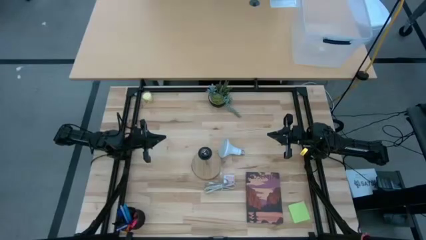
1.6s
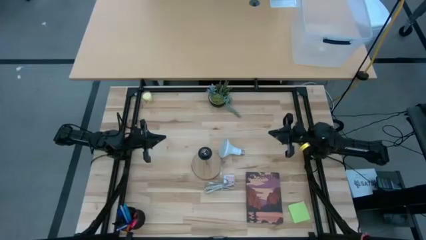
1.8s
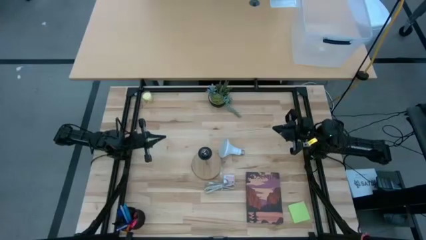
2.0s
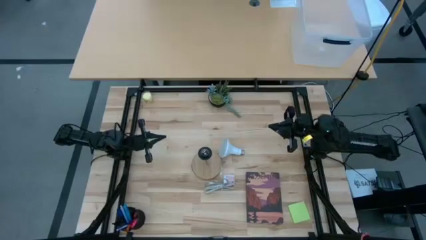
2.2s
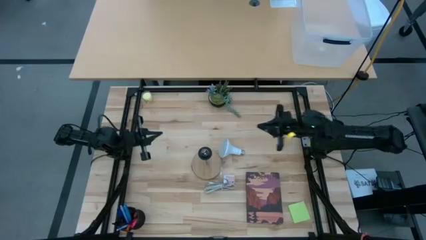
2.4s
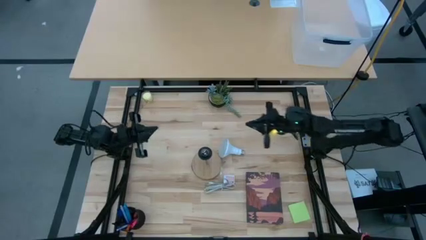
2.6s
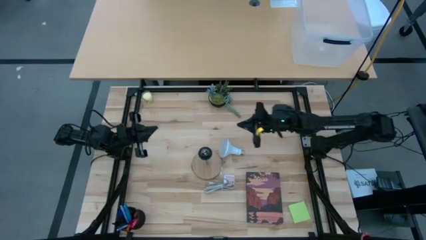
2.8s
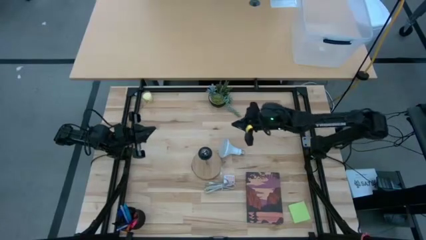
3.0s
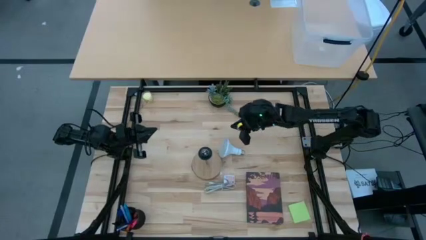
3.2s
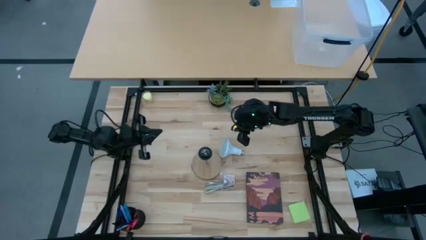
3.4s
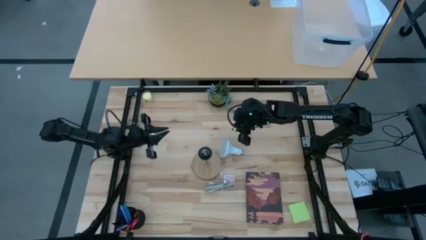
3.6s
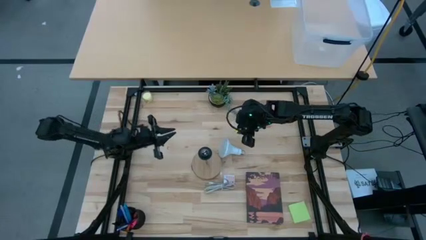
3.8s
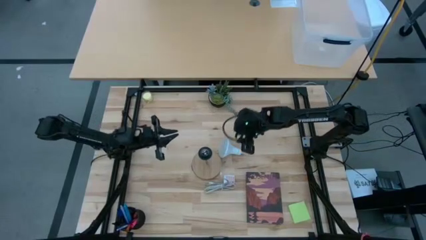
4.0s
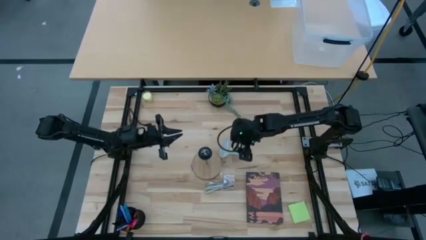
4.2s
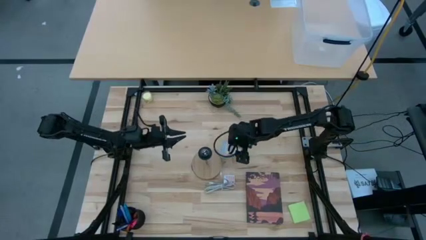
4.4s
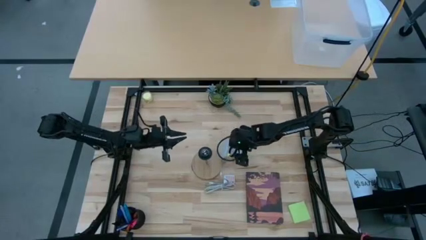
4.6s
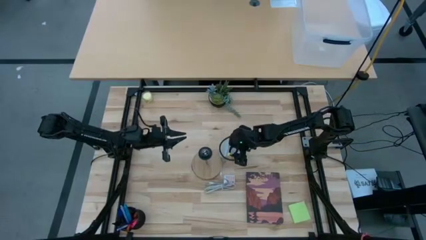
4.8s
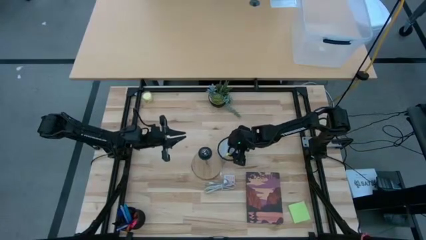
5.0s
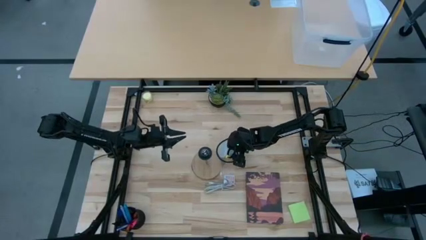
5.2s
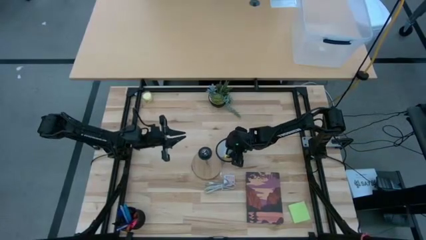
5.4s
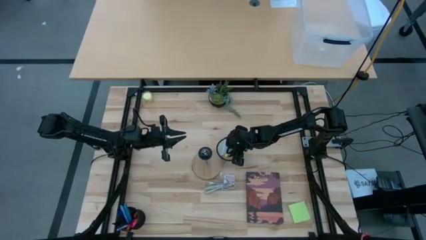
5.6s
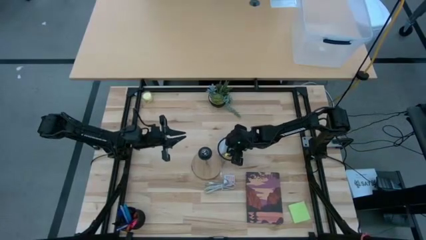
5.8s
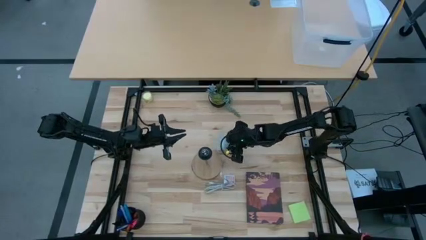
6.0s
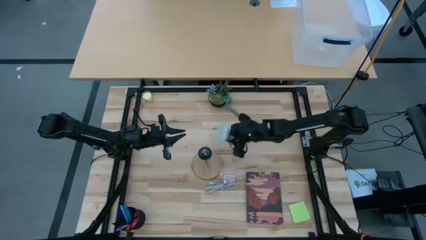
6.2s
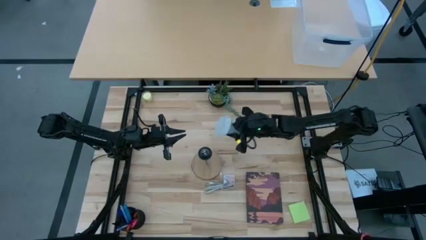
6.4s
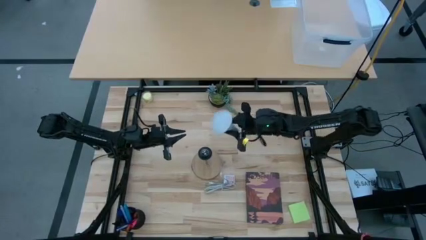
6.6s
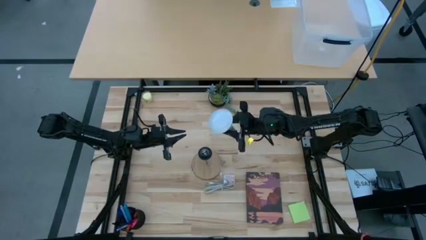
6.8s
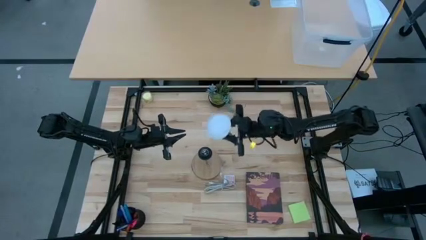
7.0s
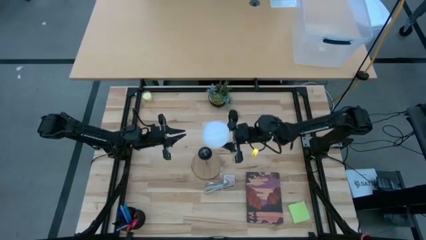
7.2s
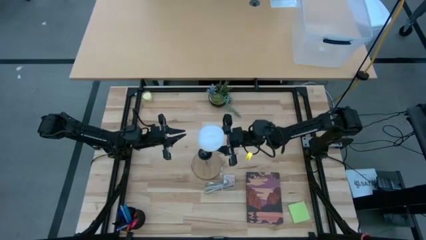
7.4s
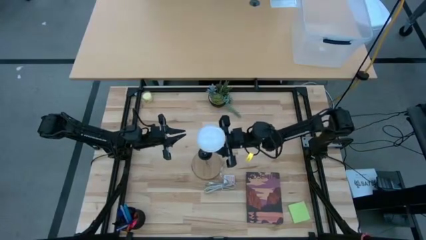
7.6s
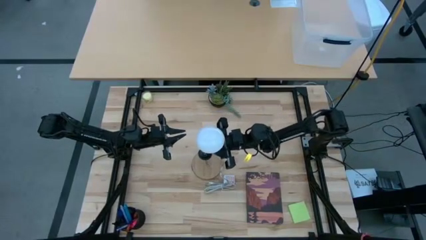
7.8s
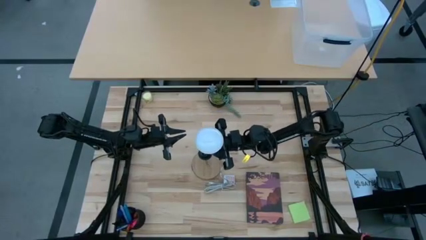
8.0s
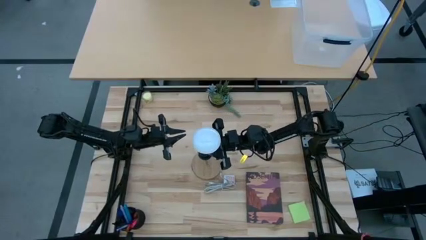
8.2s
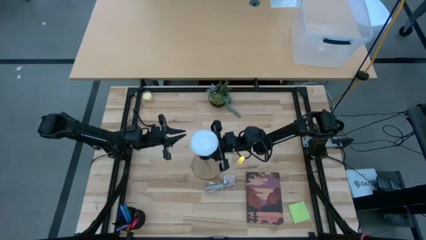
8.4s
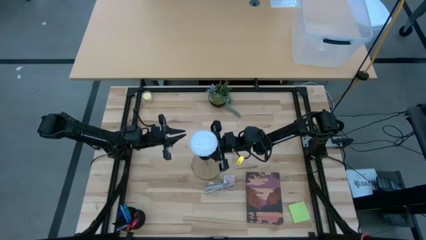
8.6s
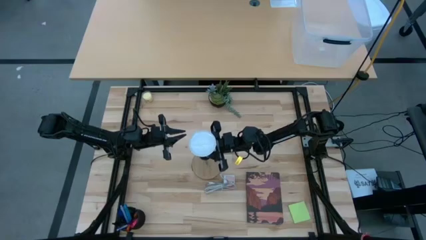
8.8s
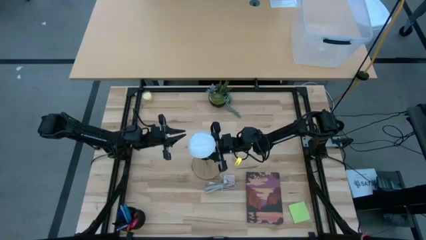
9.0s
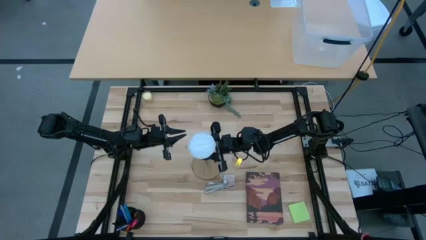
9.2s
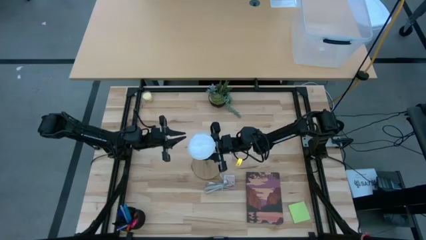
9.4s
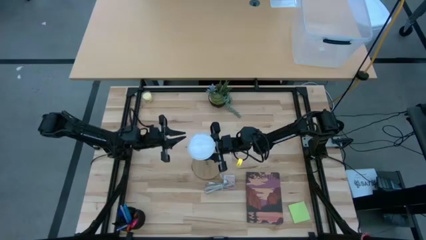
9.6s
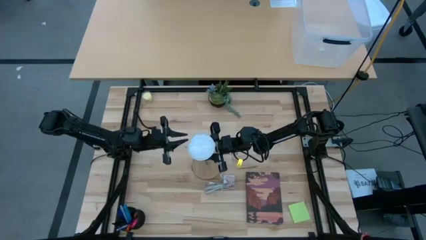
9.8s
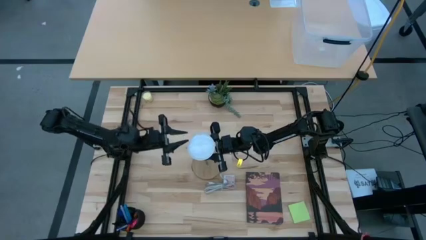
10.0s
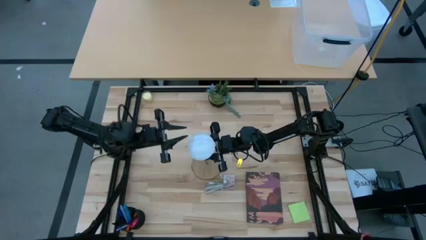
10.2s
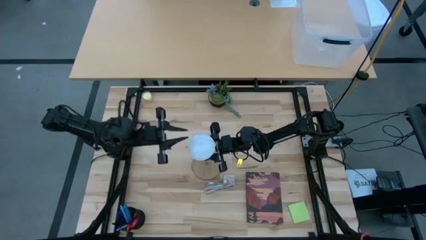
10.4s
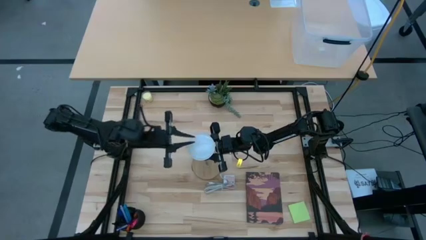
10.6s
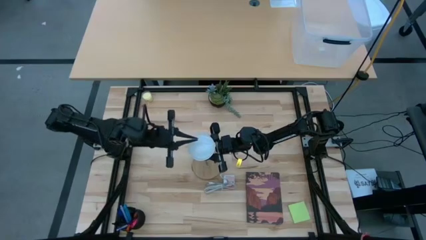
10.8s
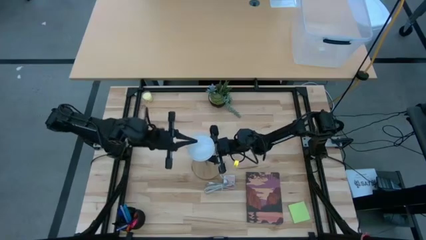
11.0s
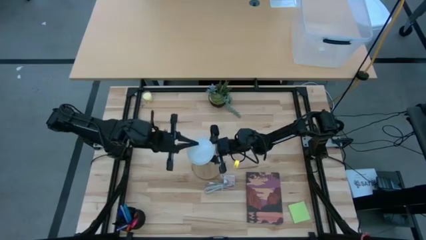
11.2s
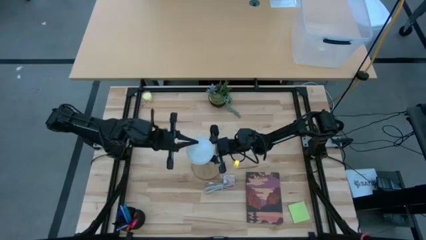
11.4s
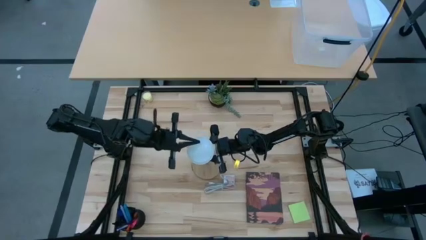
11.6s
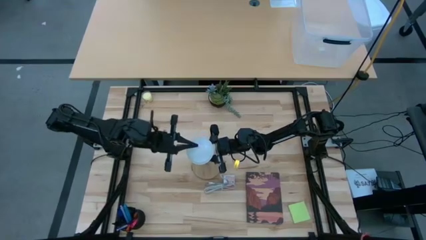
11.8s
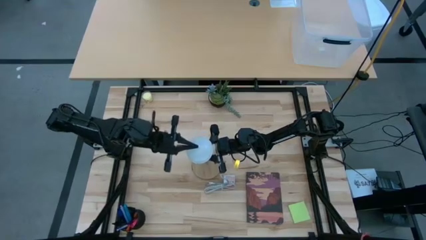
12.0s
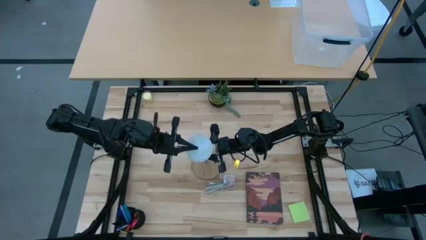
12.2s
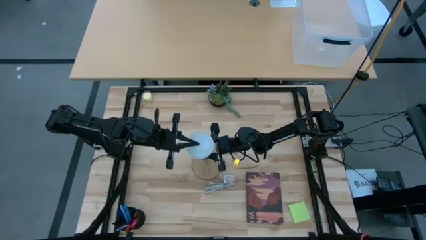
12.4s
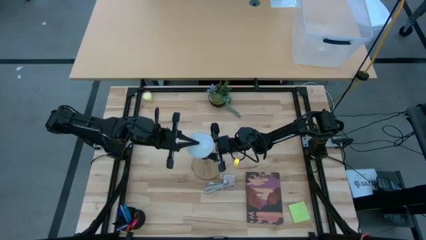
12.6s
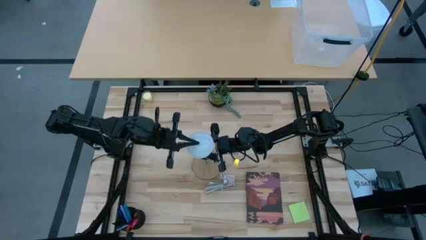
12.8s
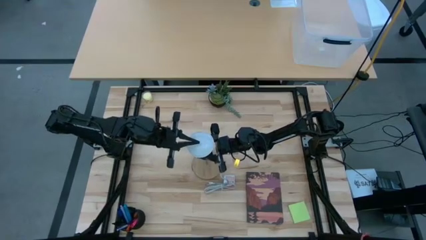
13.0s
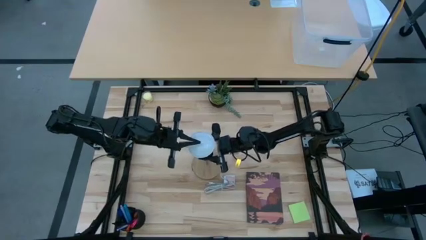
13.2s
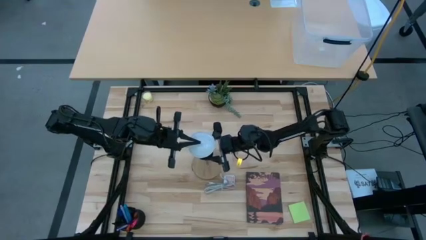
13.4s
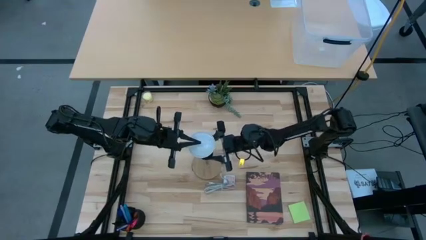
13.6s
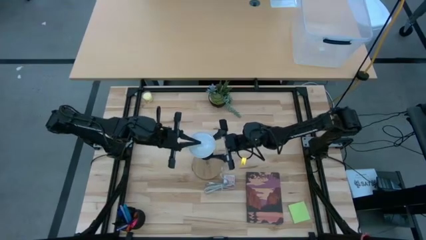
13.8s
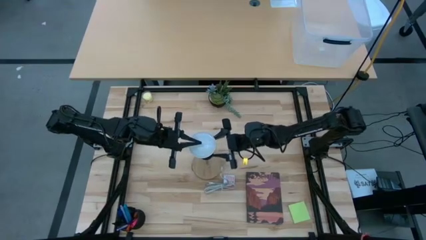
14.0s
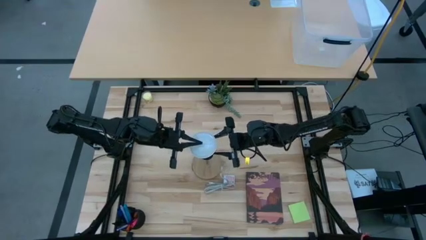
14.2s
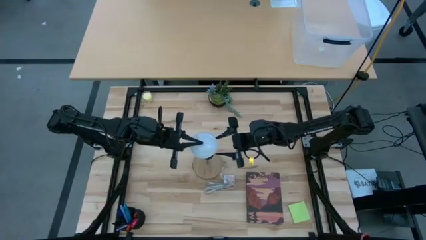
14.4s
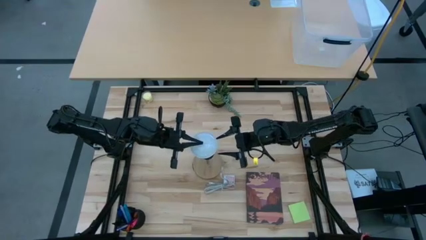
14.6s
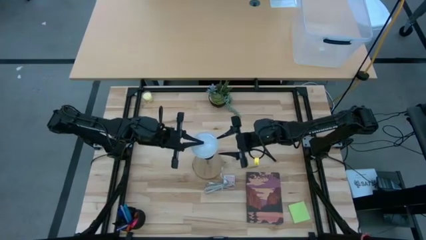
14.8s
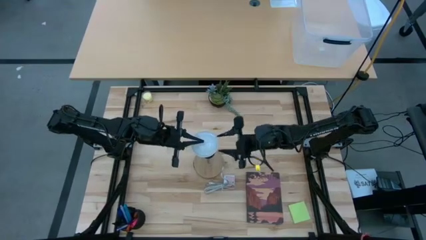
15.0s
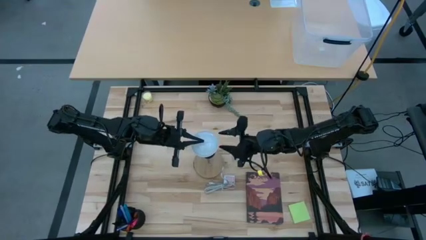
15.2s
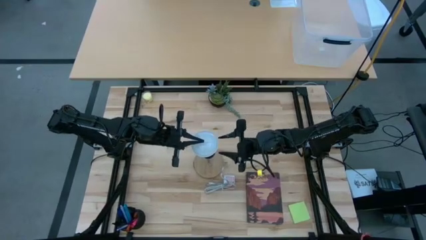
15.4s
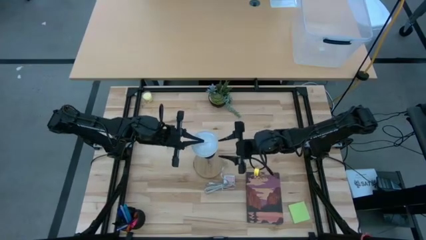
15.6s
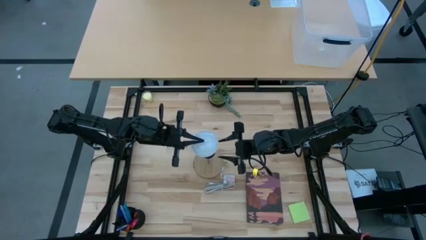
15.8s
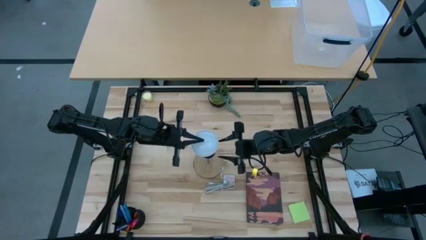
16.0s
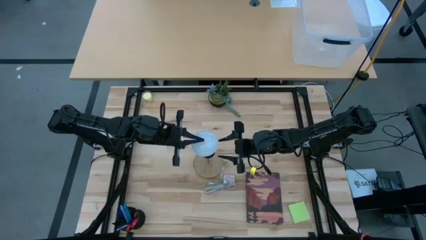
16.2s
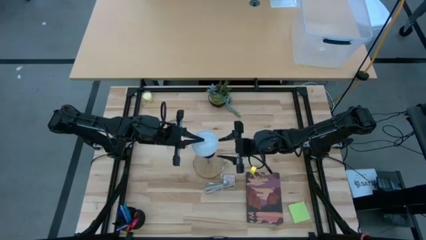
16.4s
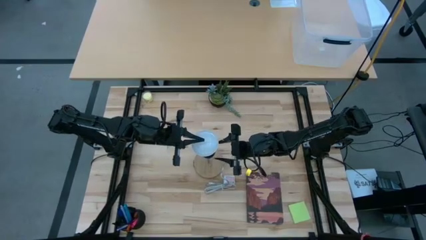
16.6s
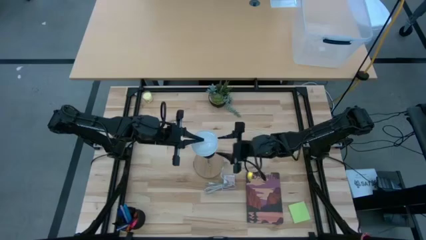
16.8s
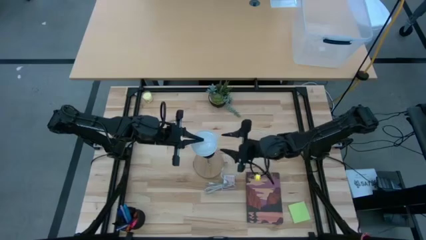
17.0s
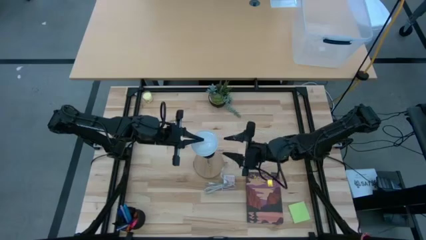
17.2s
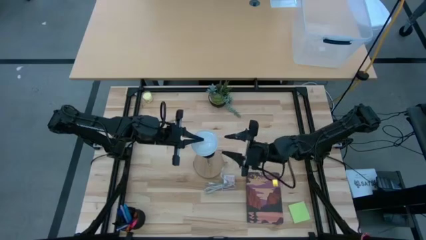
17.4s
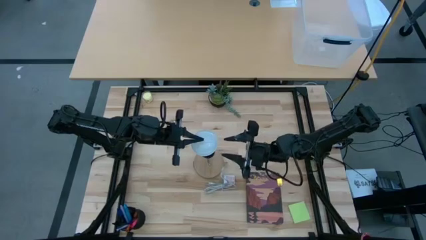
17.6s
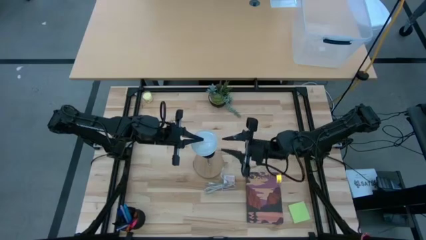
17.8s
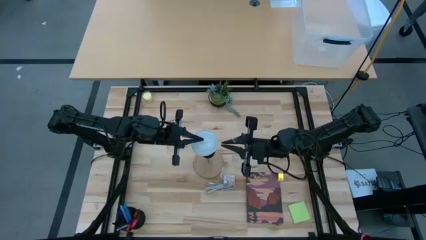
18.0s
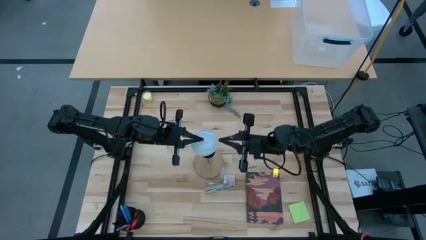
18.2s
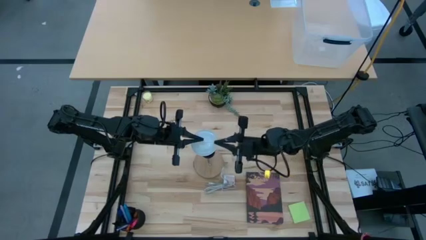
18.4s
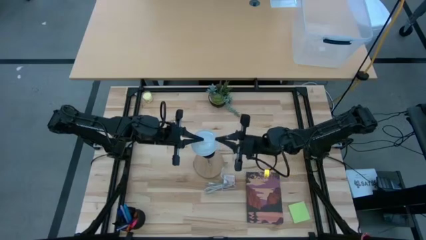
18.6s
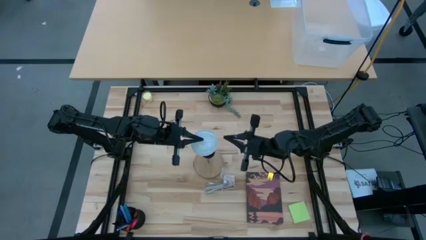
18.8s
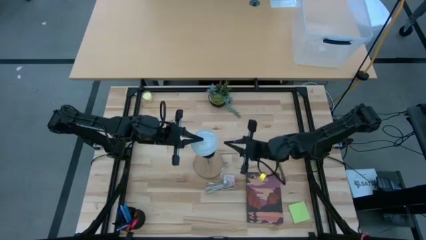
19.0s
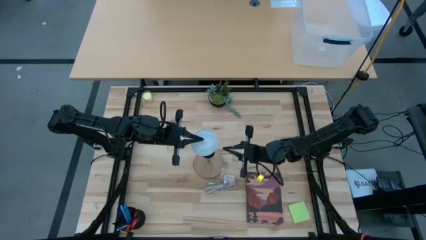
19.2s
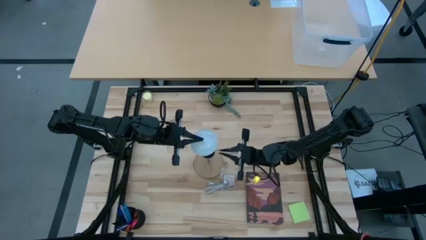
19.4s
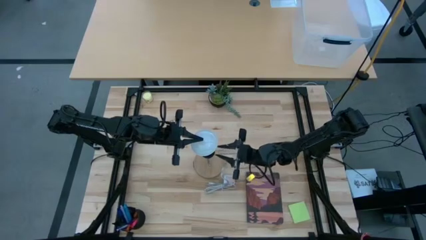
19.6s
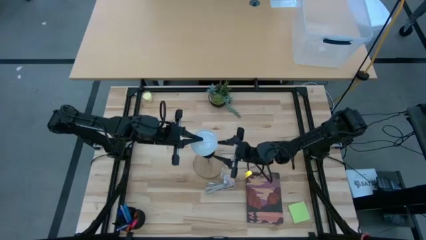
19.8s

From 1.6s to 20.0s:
Task: Screw lightbulb
Insert the white lightbulb into the silver lamp
